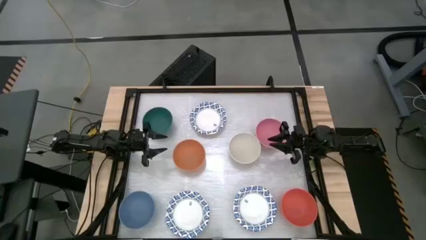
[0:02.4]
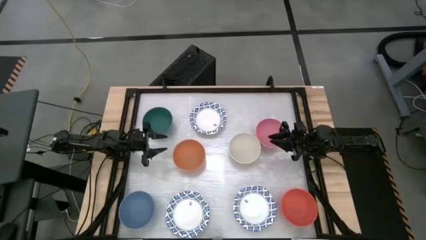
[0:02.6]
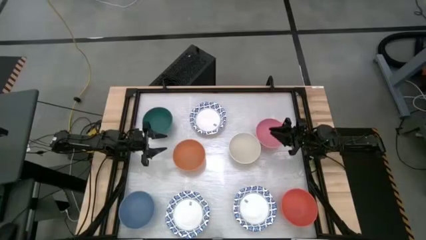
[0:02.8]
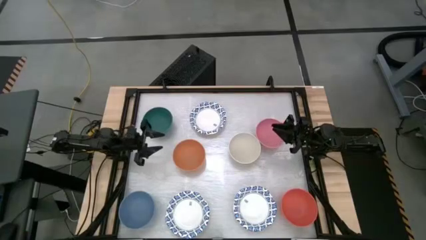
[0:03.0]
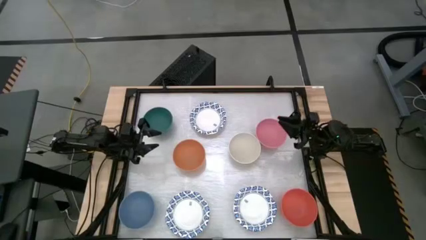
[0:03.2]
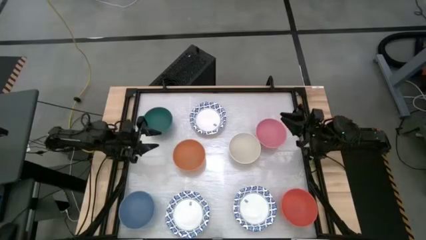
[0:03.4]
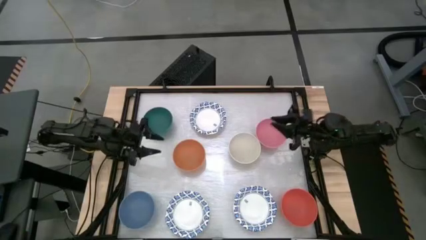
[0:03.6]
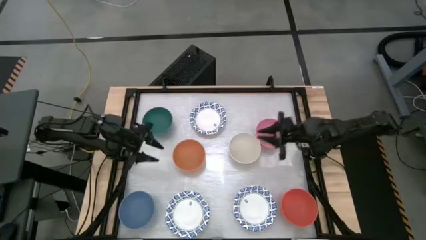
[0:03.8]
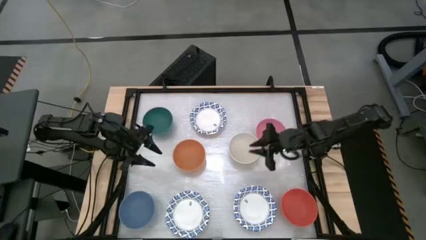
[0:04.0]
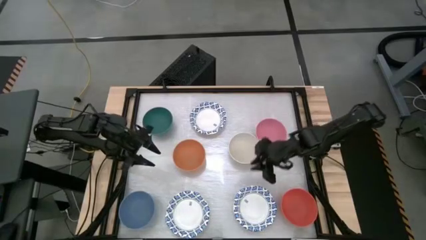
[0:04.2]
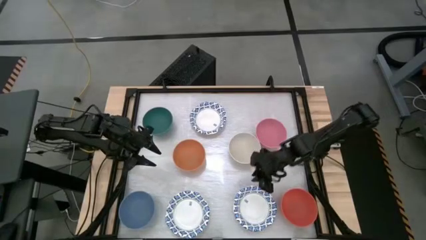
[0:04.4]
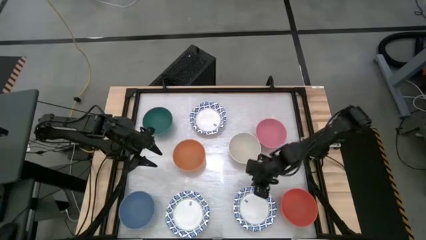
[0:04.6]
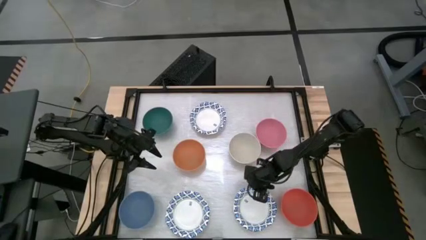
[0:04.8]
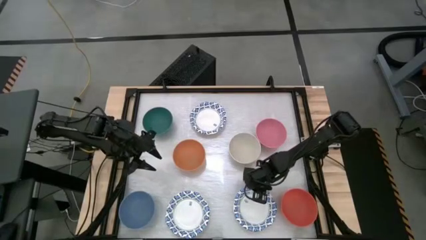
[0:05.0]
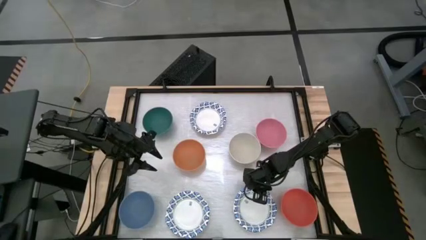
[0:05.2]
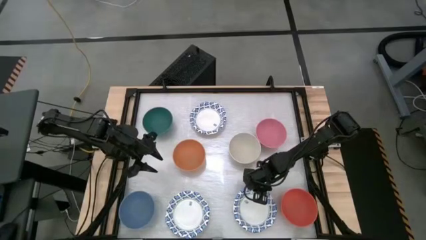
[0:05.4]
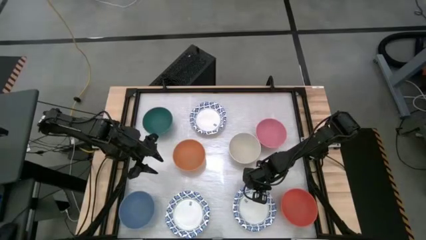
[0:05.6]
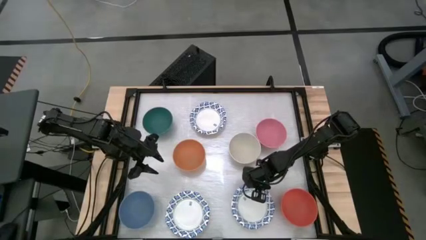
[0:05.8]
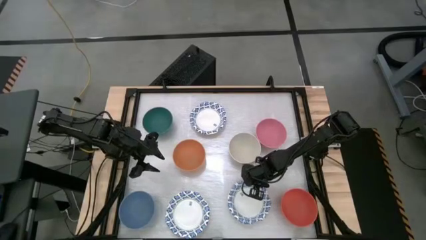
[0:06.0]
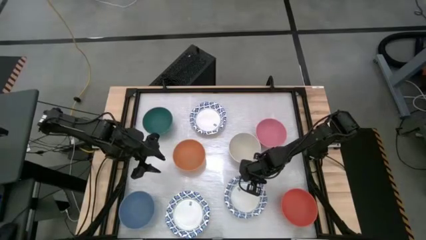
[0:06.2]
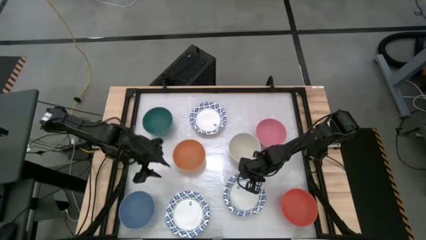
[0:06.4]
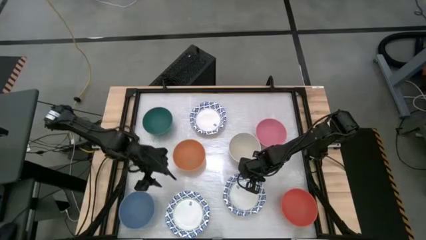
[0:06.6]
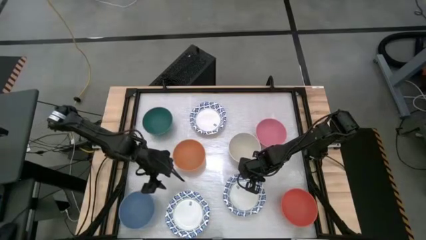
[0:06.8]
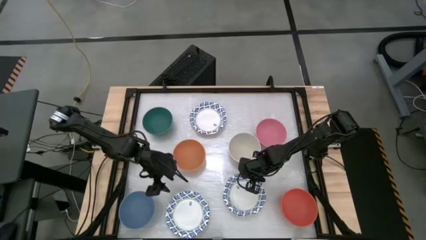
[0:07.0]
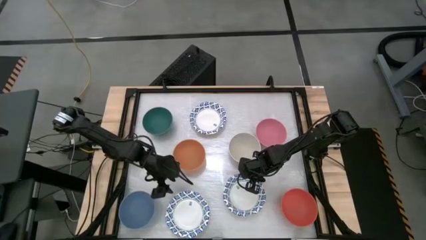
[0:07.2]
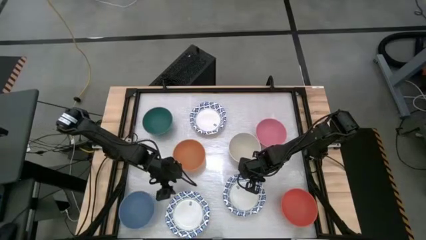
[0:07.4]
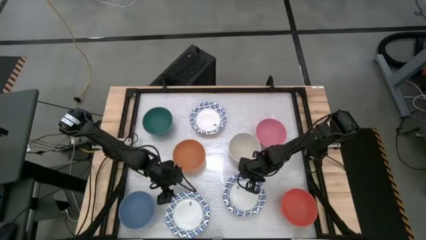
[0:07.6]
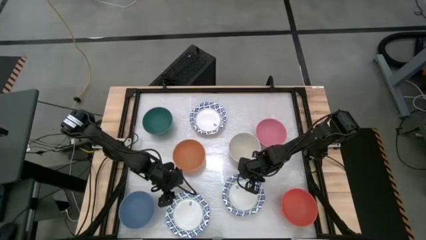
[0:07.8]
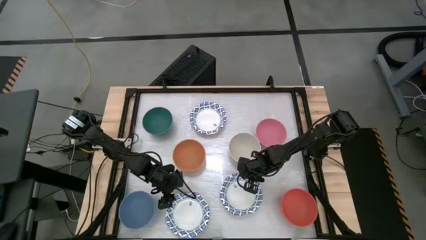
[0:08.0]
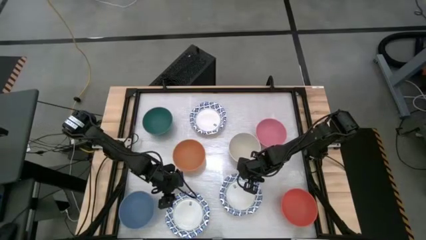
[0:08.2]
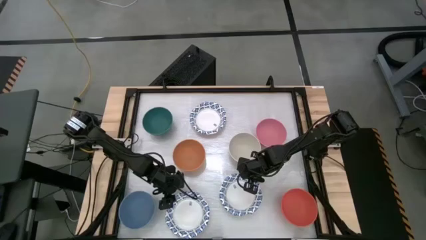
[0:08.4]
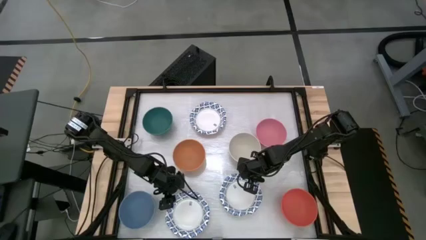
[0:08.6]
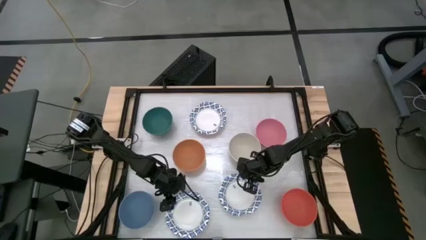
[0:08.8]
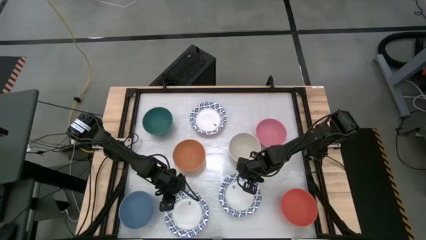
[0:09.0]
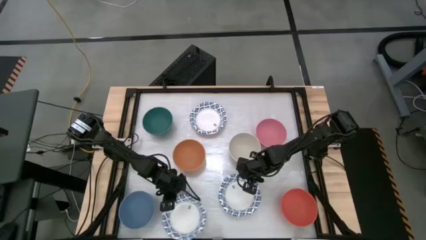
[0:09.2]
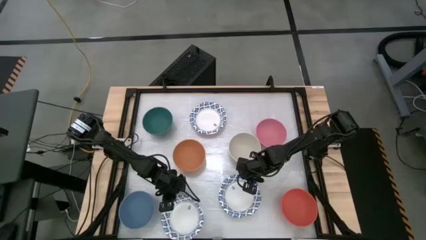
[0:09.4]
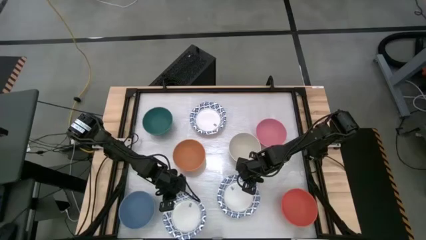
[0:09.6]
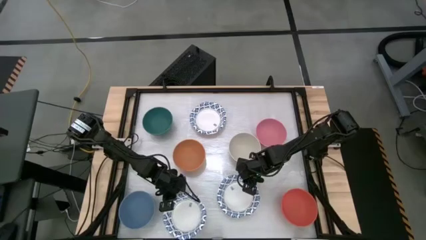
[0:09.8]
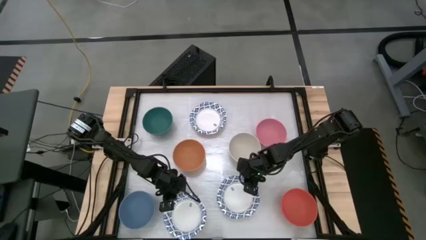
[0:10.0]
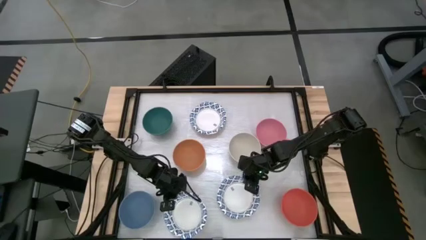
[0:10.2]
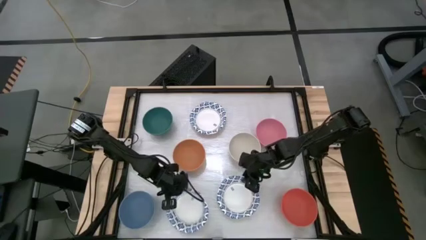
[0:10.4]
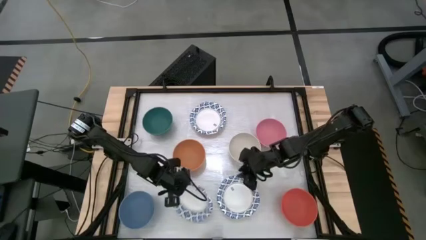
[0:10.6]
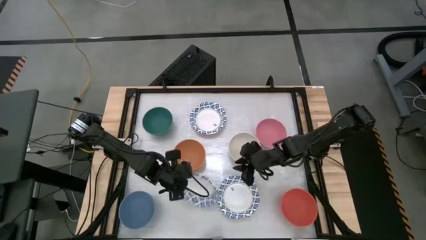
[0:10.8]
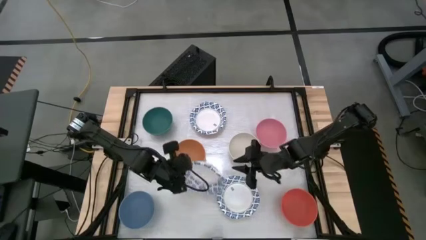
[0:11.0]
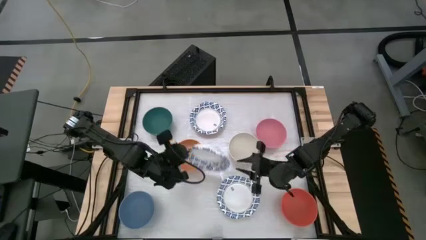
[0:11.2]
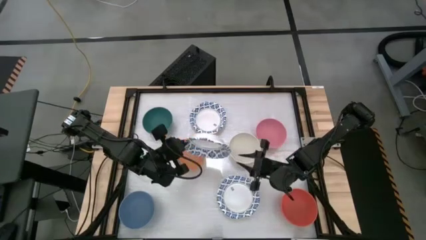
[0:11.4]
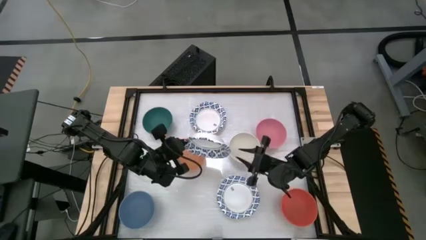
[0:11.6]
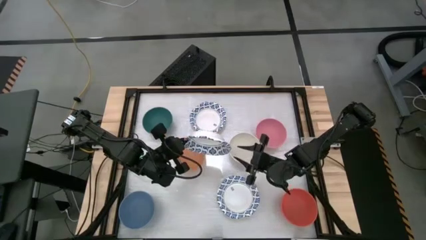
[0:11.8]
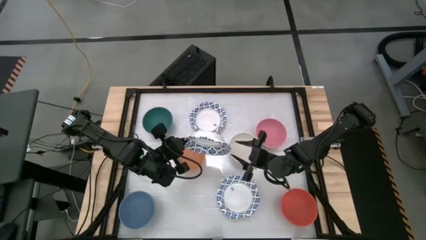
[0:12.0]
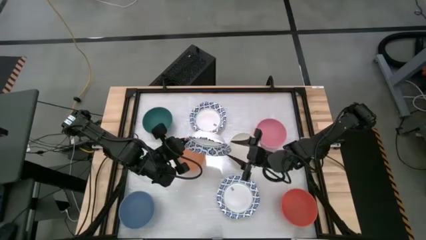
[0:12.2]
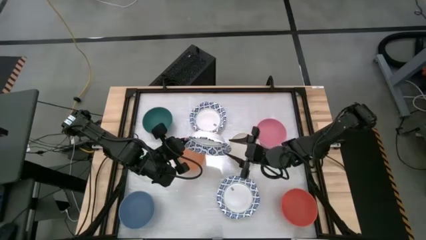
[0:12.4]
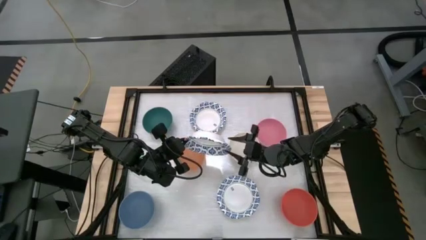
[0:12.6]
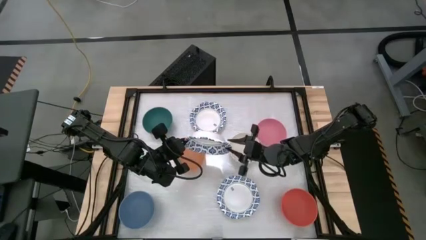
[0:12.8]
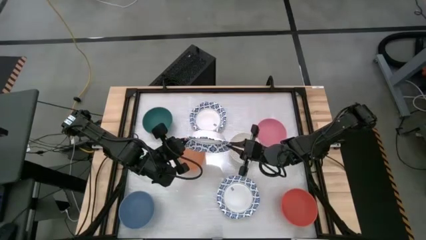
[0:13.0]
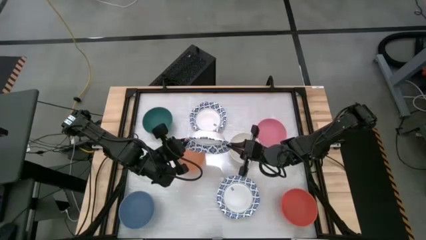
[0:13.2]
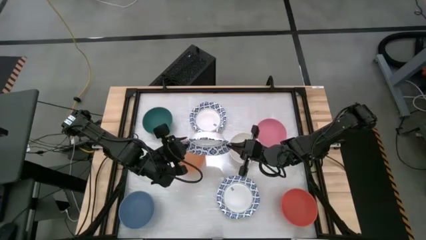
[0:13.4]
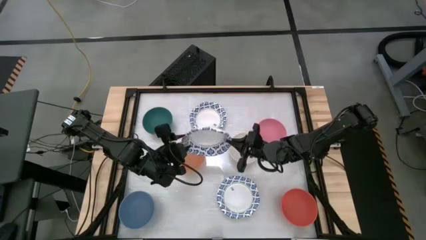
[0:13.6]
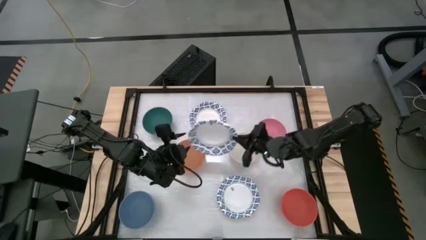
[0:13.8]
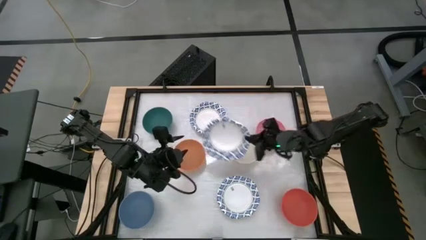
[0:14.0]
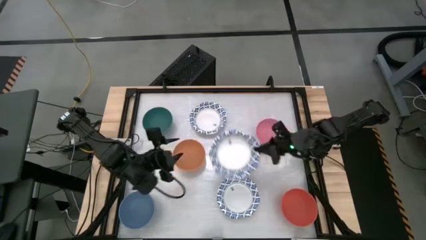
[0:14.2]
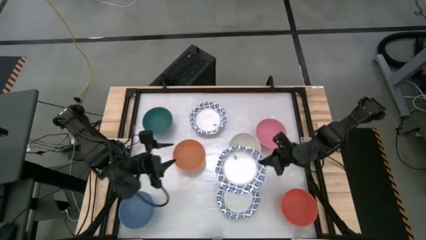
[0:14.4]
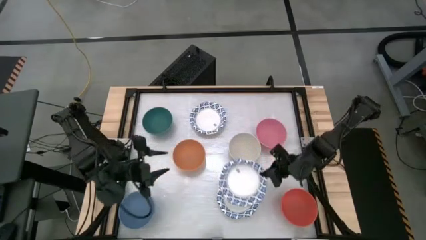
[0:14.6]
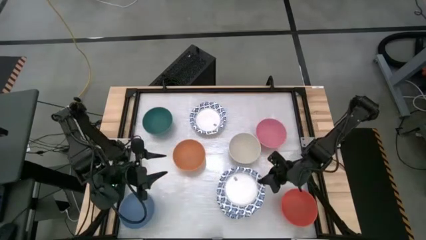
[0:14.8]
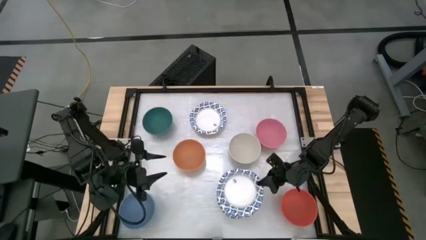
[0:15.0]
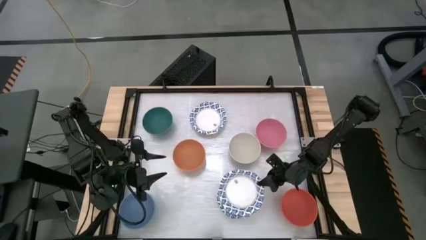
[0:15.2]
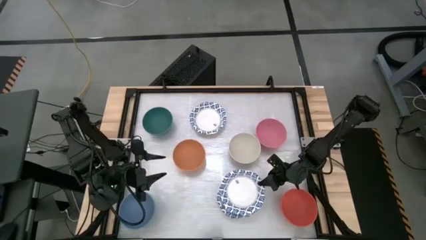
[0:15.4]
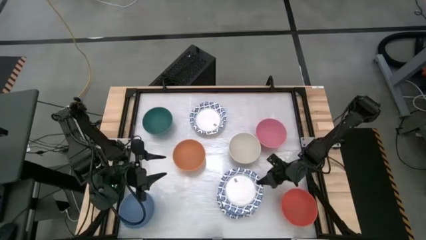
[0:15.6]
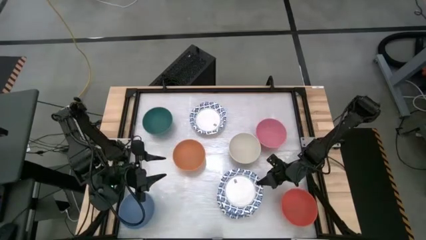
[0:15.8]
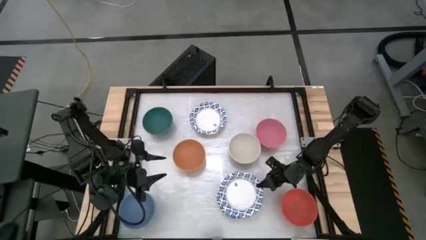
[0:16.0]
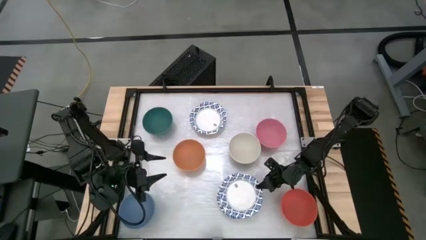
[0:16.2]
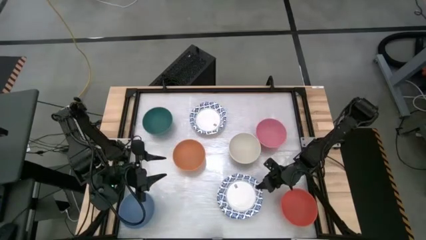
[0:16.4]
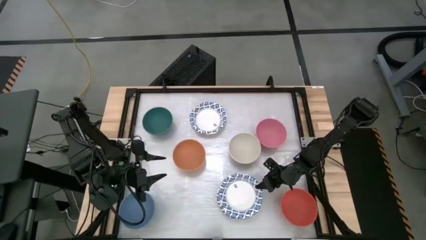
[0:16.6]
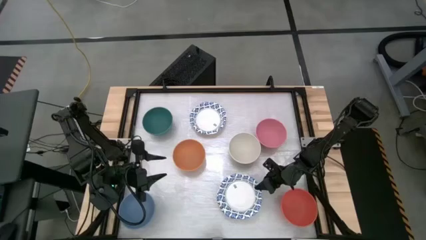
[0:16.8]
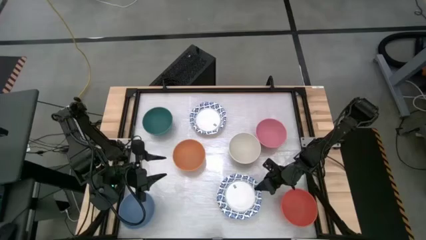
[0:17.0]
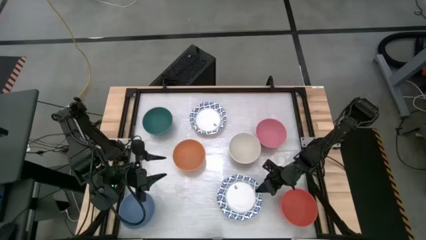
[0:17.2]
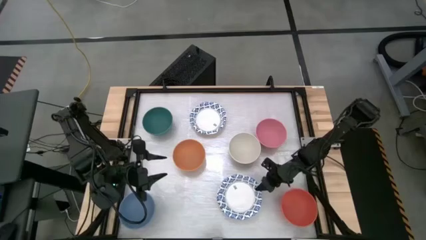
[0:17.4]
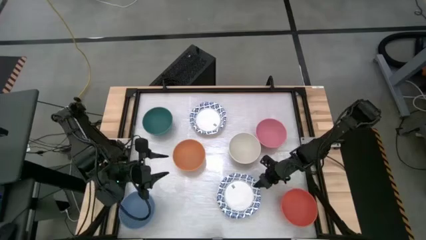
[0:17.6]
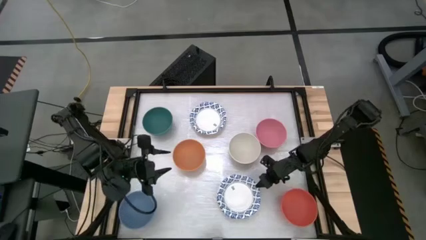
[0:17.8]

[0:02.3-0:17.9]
Stack the left white paper bowl into the right white paper bowl
